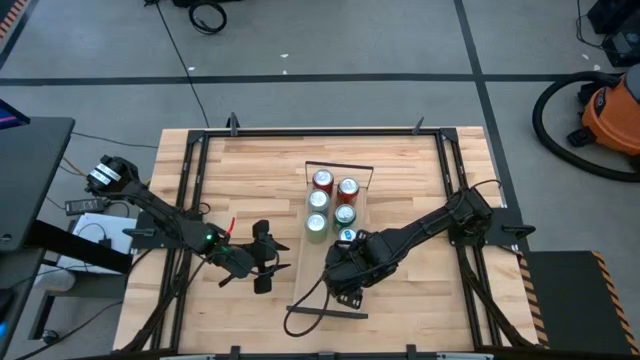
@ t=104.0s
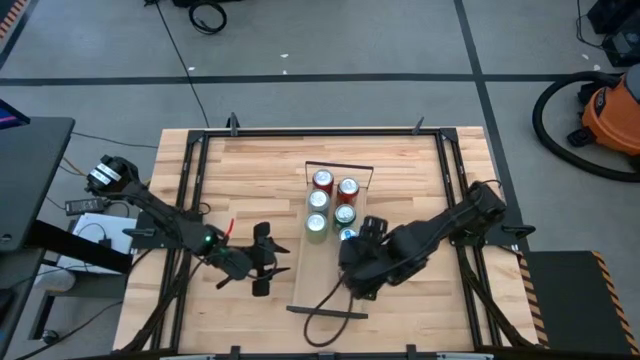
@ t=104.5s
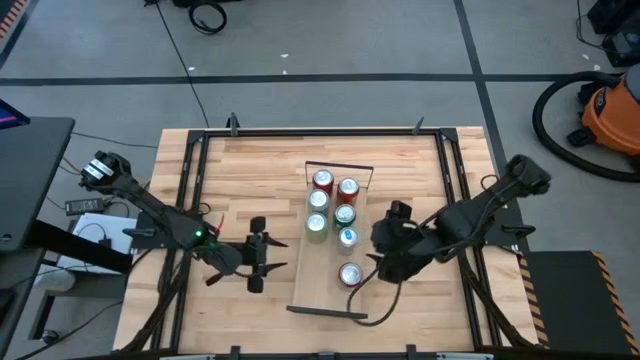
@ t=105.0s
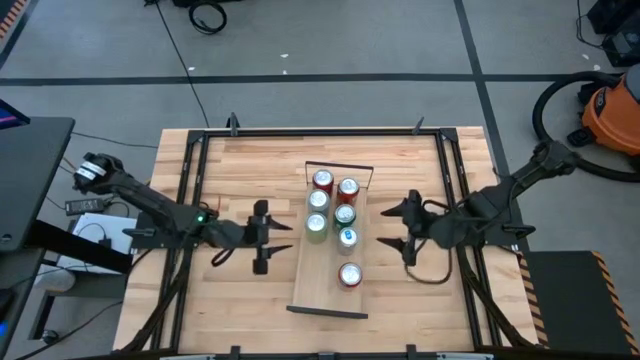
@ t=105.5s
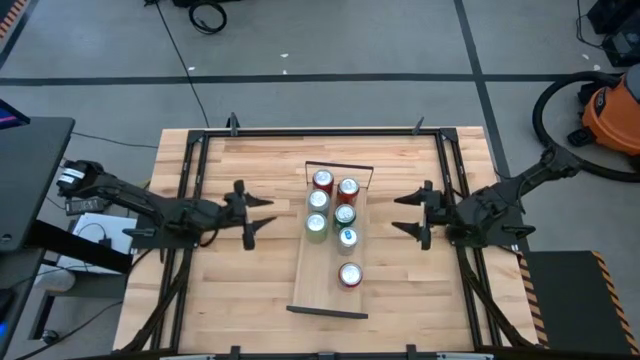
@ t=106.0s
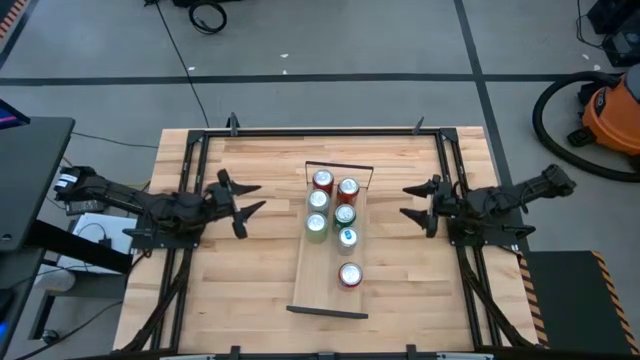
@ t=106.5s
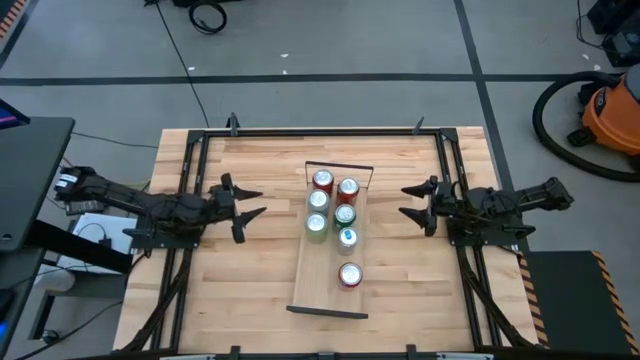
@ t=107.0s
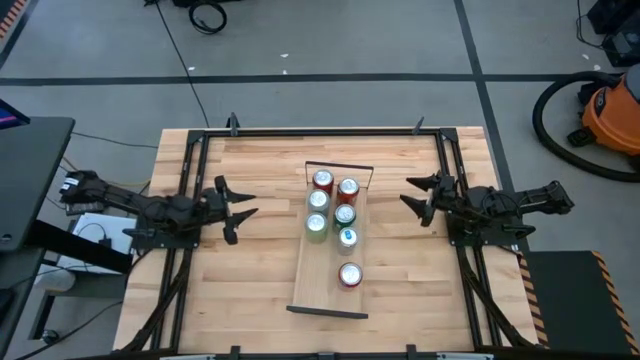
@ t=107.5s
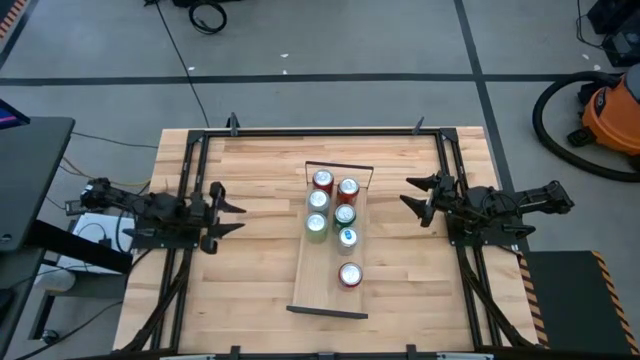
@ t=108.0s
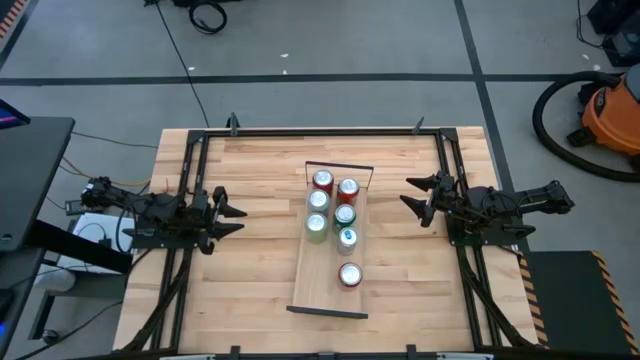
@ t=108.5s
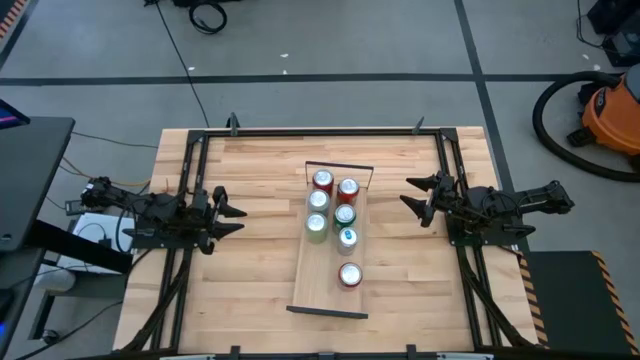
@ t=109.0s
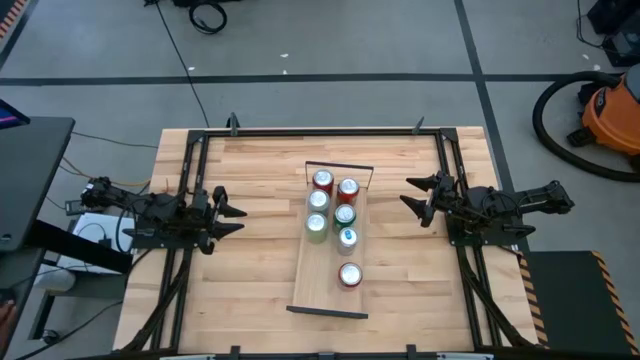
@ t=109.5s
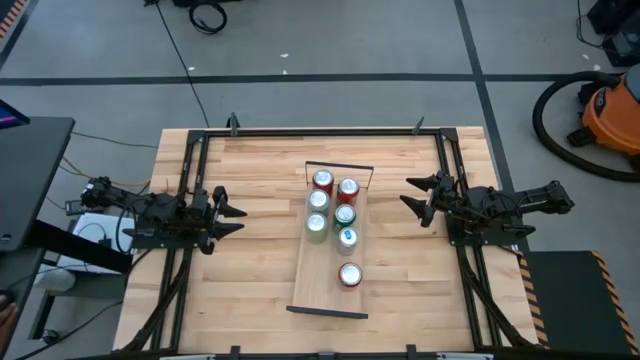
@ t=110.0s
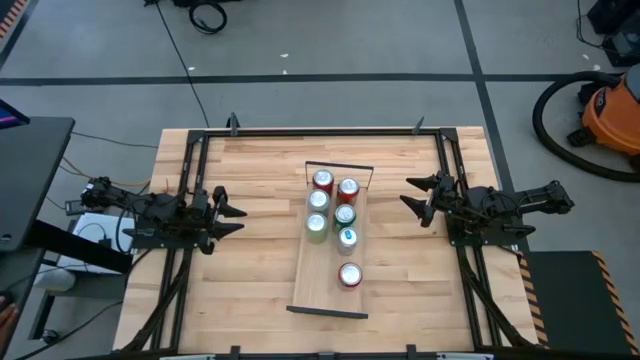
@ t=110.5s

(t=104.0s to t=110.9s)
Task: Place canned beverage on shelf
Return to Home Position

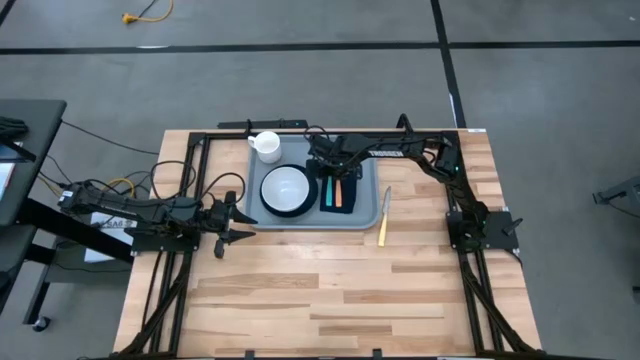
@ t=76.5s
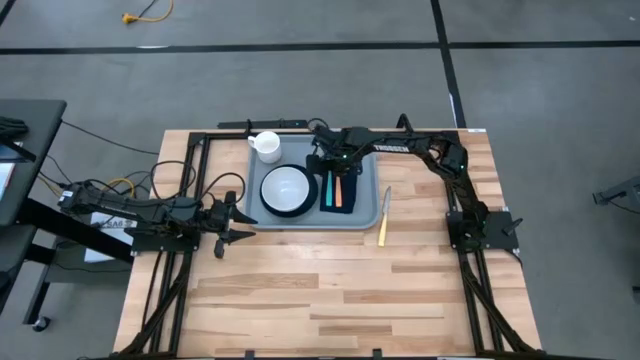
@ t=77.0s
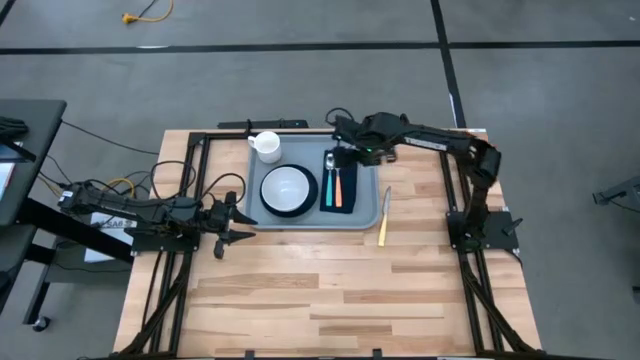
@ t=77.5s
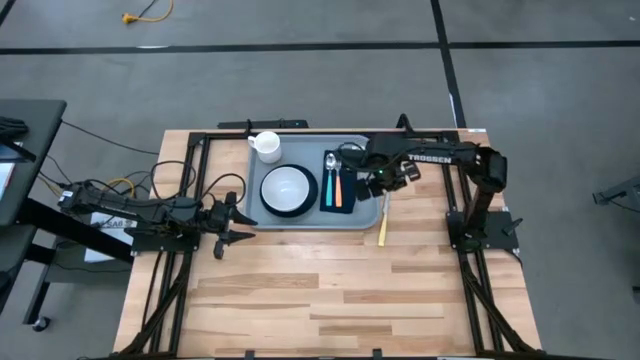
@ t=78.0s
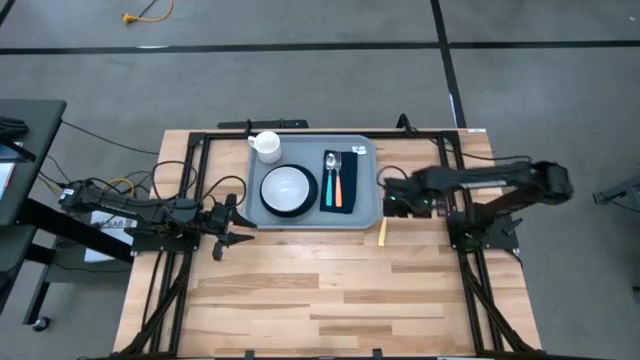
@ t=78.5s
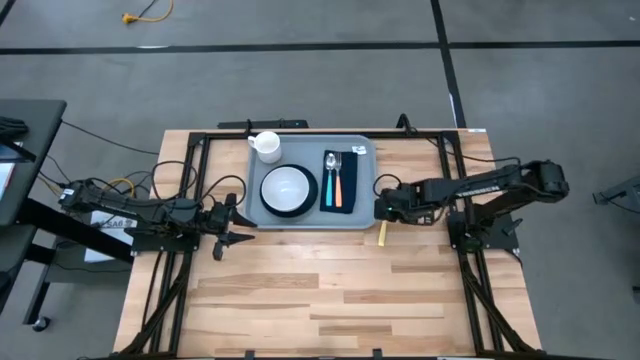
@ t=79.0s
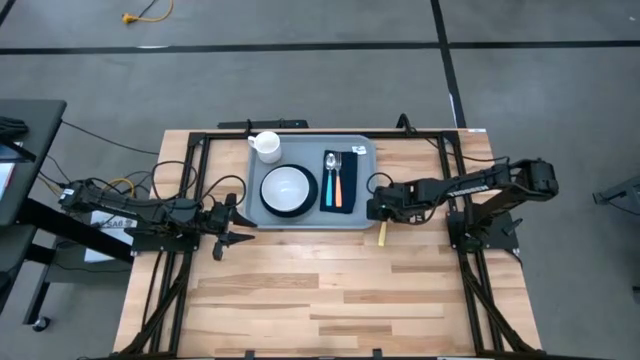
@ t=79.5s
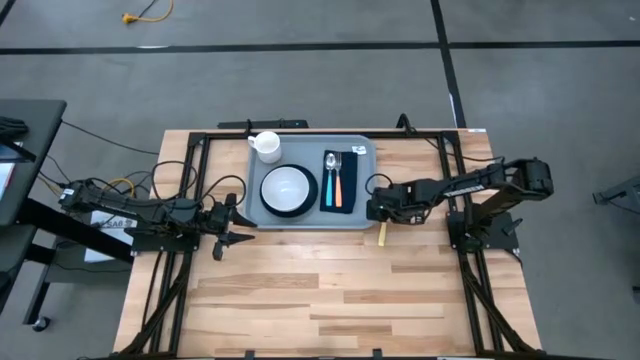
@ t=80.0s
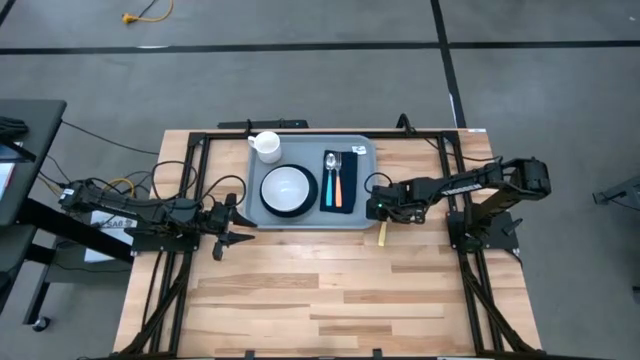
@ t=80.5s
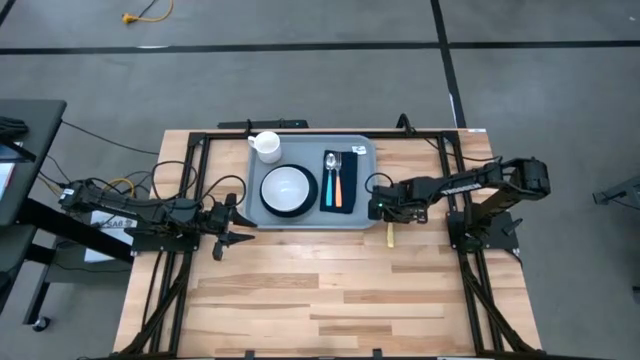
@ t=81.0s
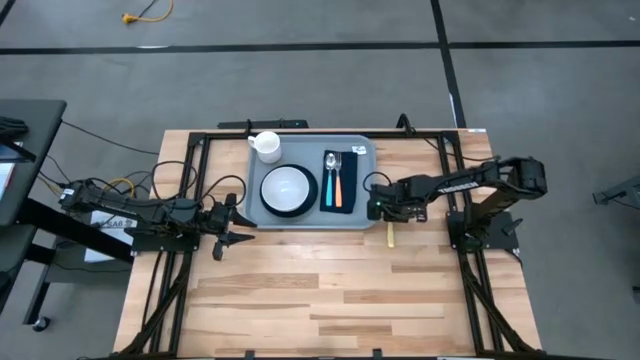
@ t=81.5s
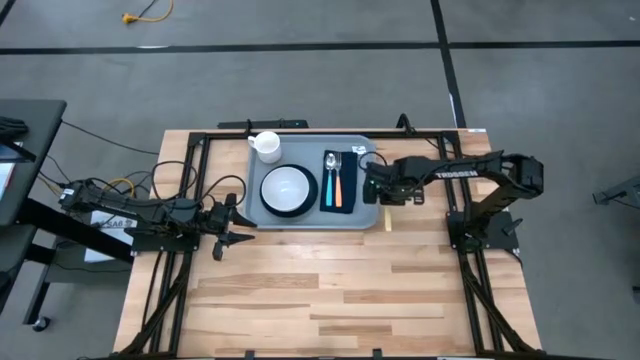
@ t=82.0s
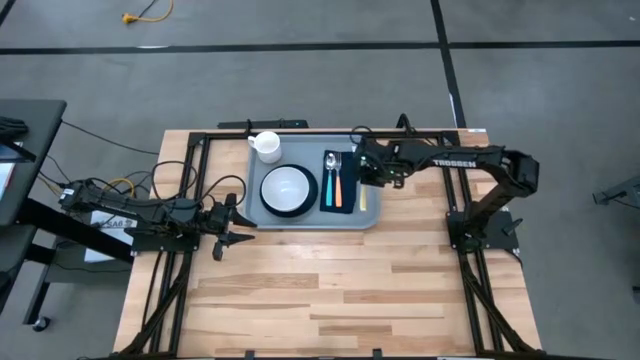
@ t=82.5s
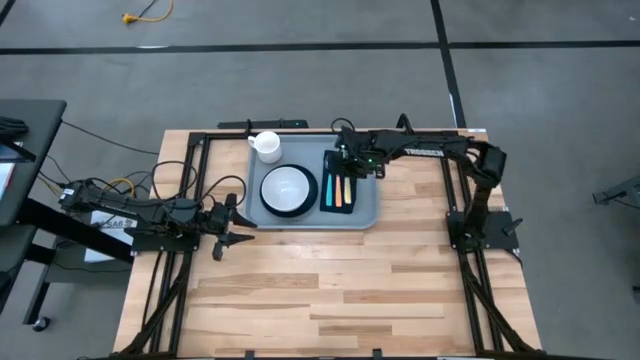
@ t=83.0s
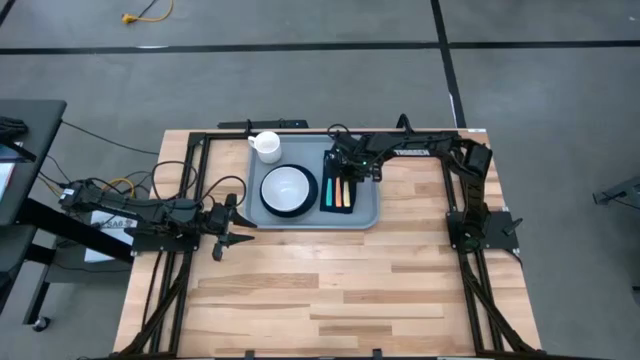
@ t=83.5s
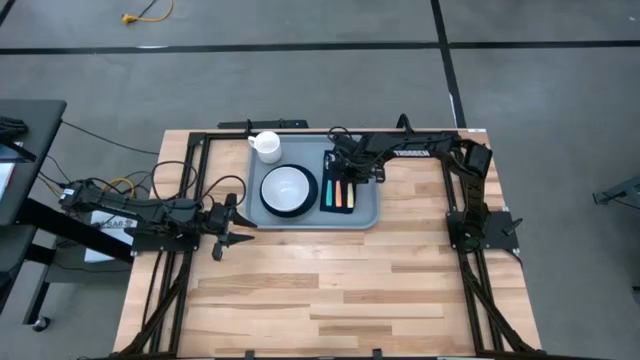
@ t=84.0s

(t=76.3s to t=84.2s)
Task: Set up tray
Put the yellow knife on the right side of the orange fork

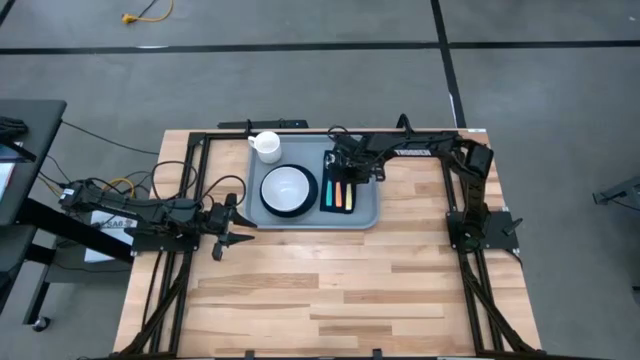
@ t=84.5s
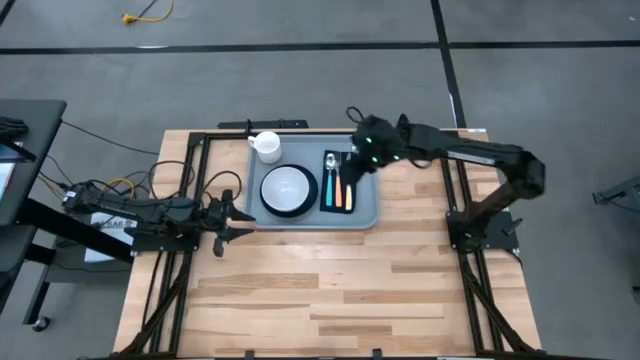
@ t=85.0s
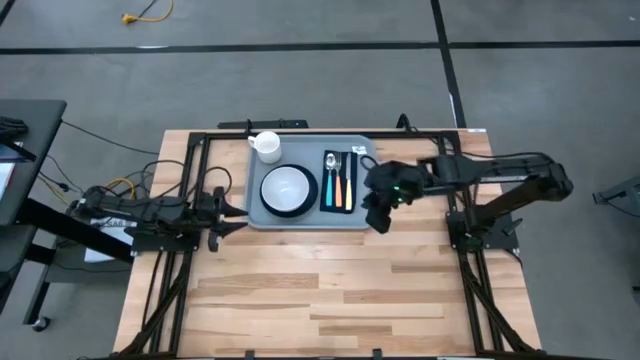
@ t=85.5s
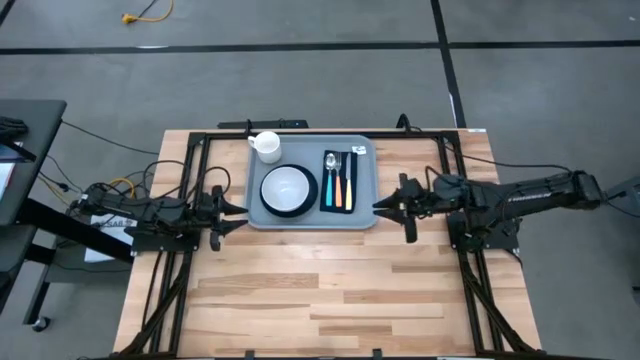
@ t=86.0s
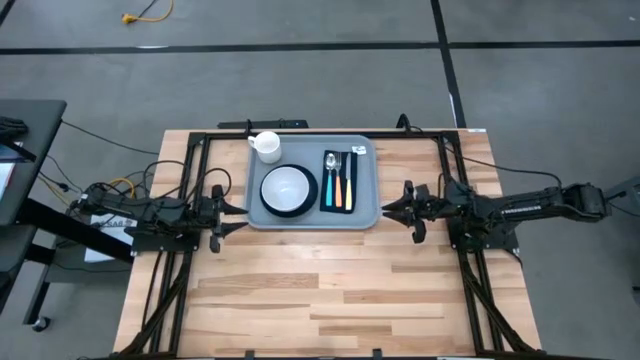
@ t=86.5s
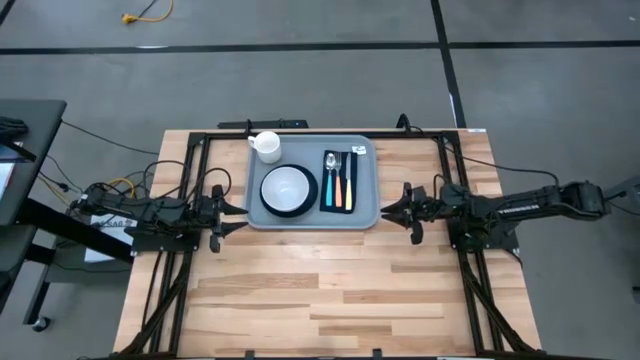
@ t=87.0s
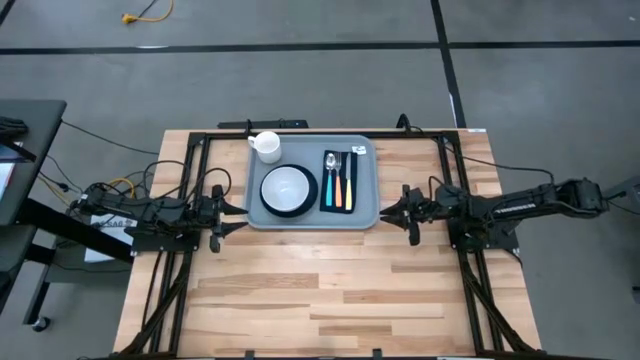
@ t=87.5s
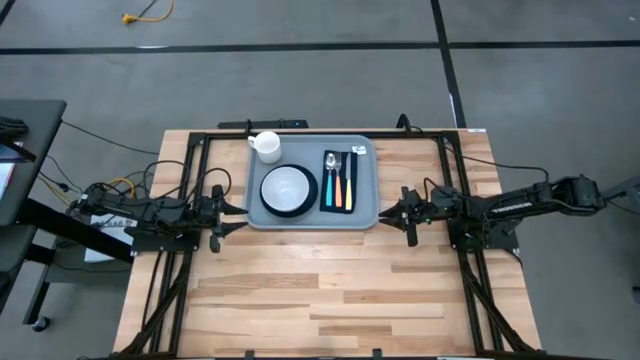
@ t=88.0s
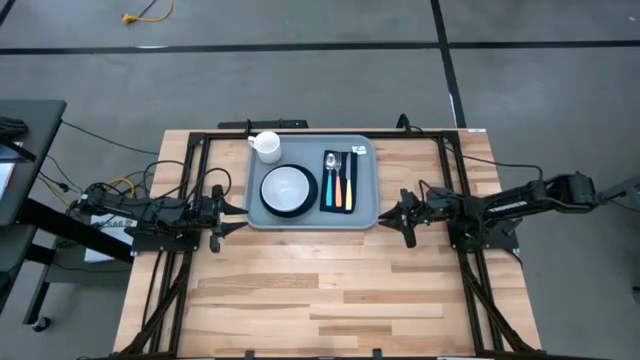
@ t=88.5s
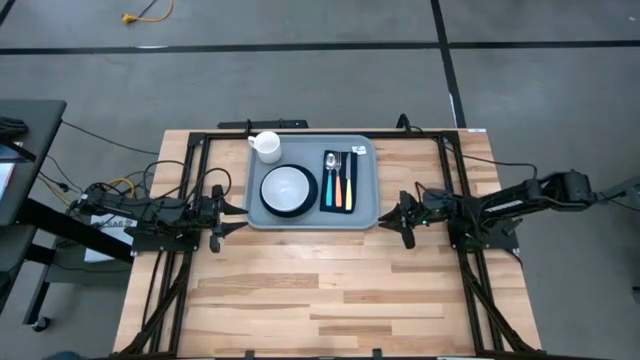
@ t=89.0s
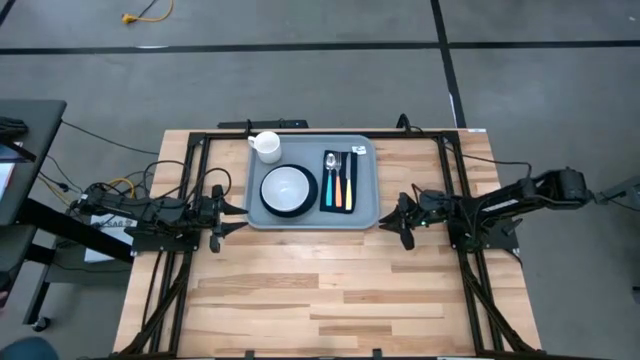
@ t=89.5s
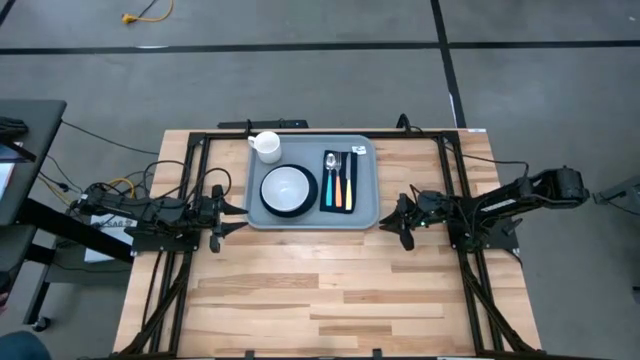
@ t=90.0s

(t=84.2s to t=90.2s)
Return to Home Position
